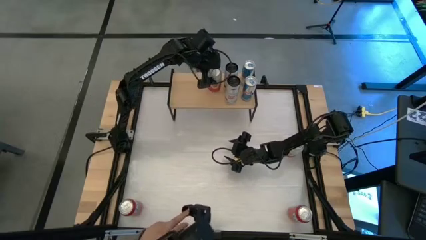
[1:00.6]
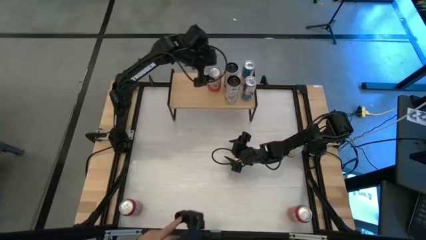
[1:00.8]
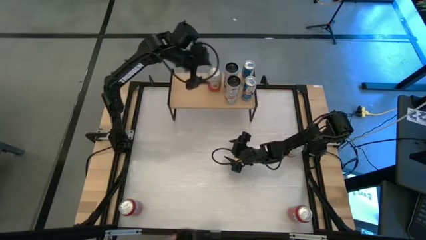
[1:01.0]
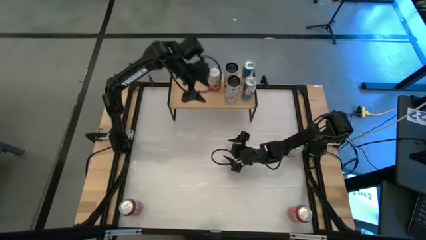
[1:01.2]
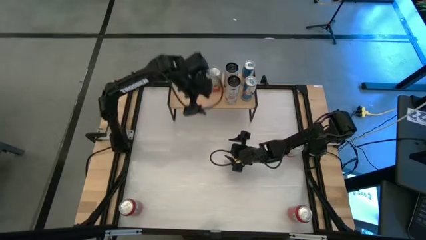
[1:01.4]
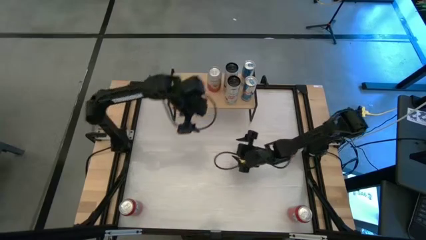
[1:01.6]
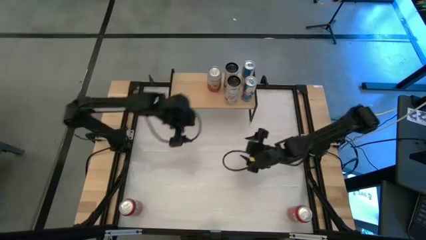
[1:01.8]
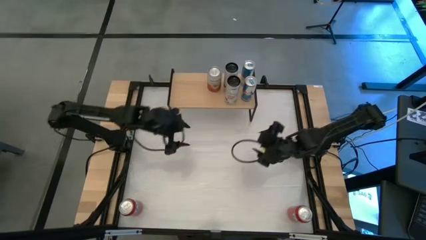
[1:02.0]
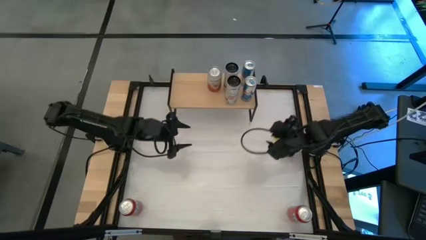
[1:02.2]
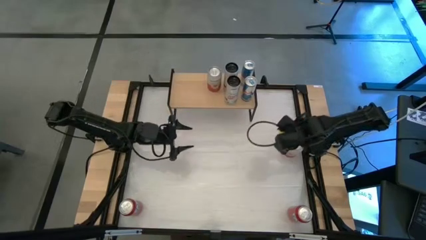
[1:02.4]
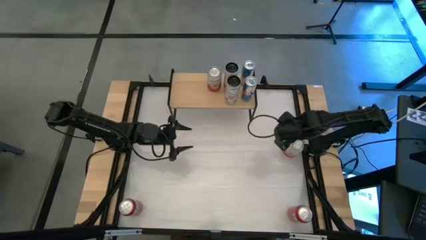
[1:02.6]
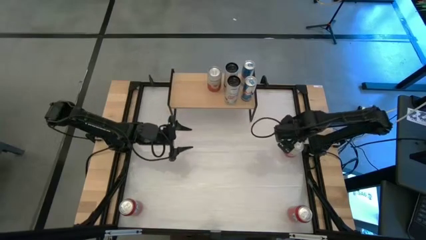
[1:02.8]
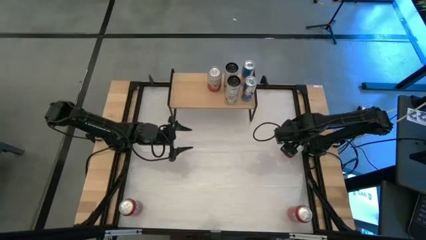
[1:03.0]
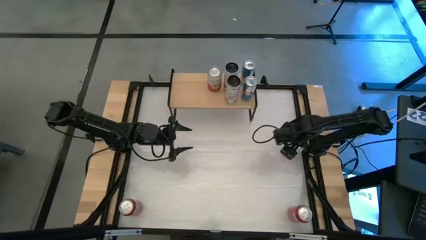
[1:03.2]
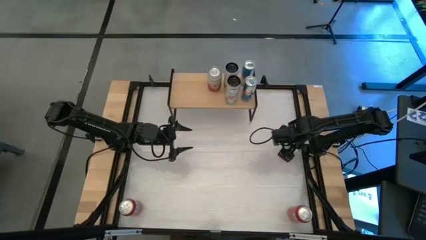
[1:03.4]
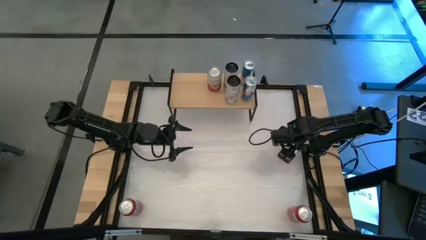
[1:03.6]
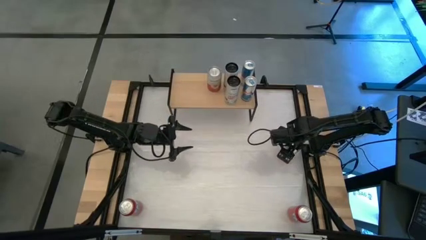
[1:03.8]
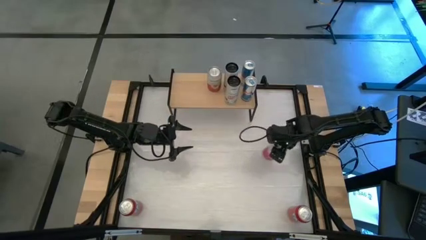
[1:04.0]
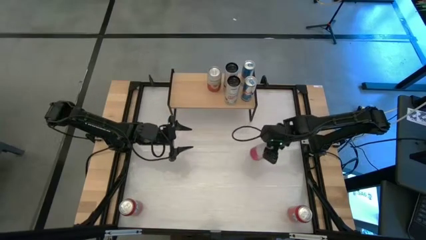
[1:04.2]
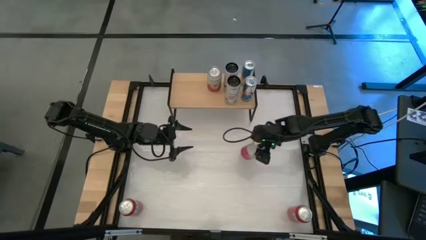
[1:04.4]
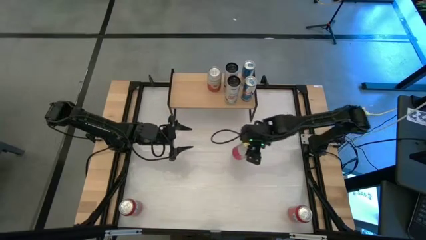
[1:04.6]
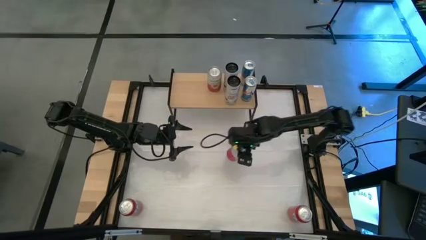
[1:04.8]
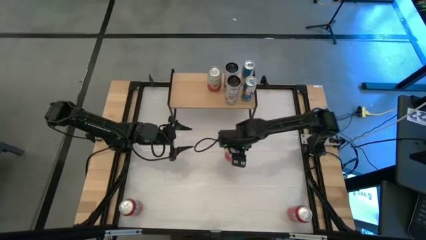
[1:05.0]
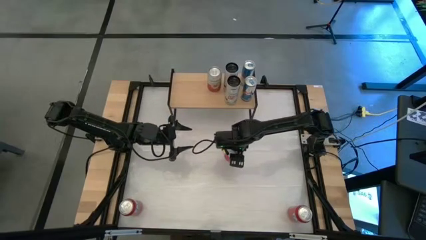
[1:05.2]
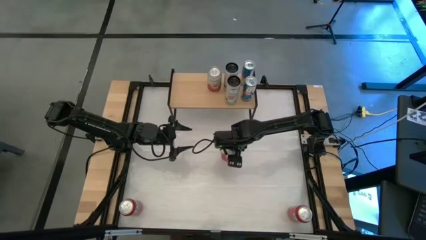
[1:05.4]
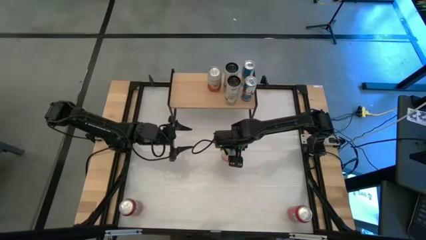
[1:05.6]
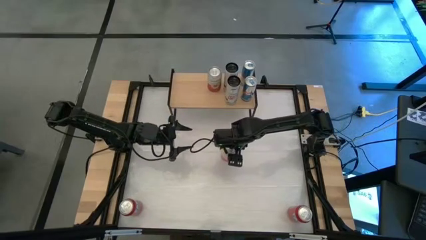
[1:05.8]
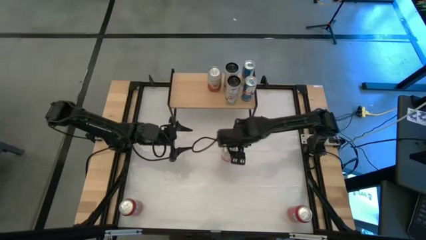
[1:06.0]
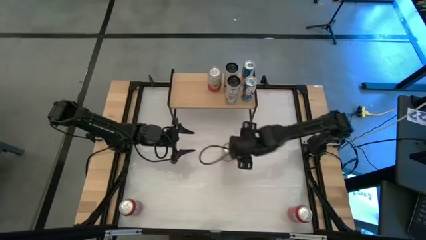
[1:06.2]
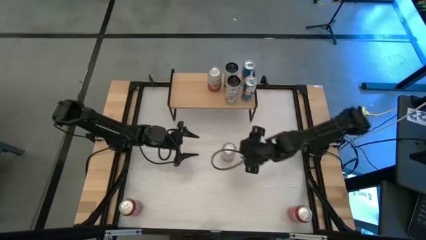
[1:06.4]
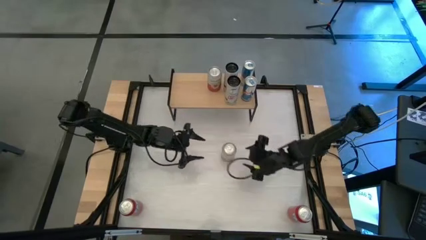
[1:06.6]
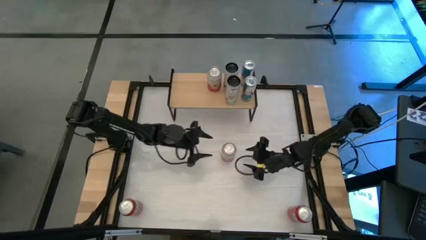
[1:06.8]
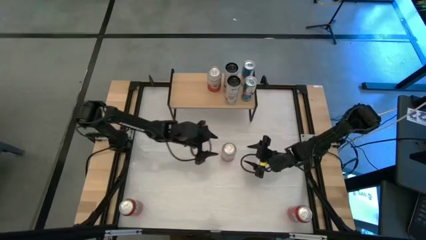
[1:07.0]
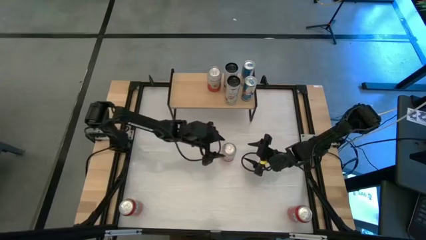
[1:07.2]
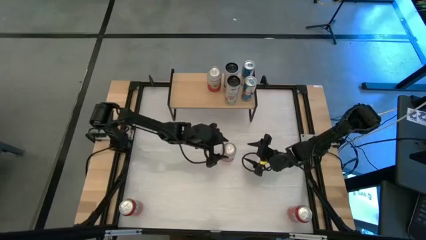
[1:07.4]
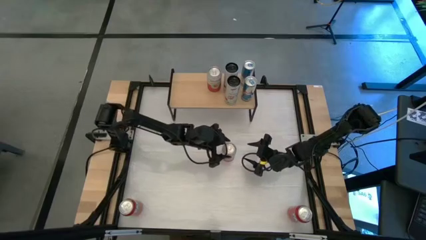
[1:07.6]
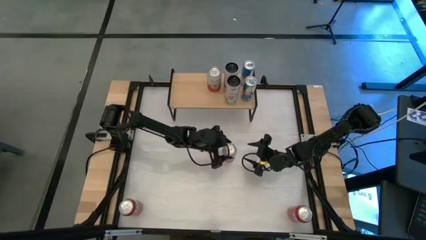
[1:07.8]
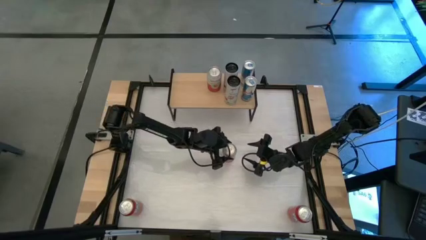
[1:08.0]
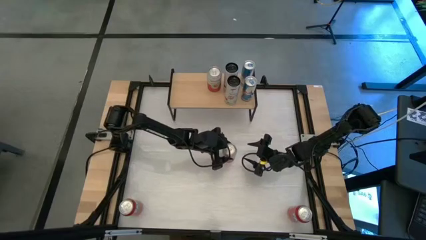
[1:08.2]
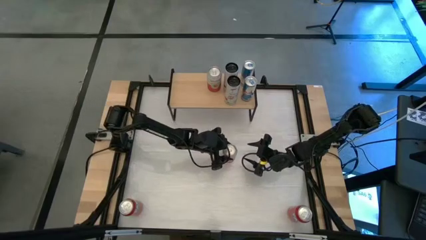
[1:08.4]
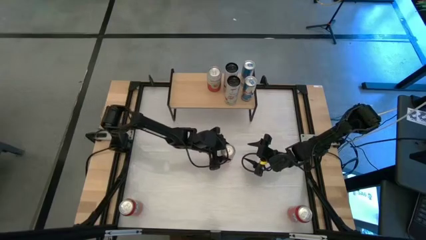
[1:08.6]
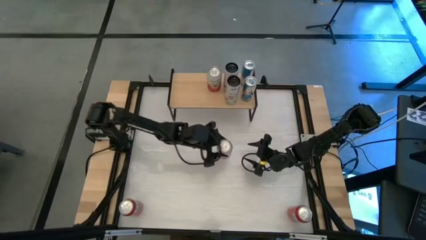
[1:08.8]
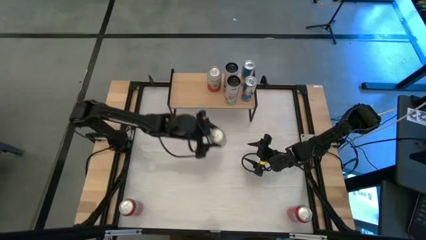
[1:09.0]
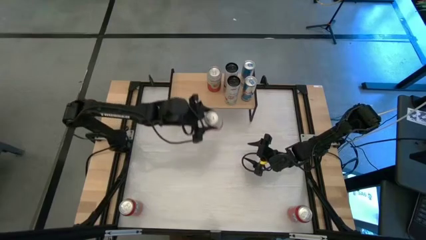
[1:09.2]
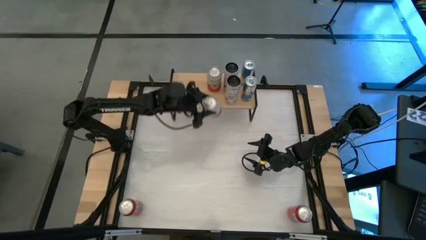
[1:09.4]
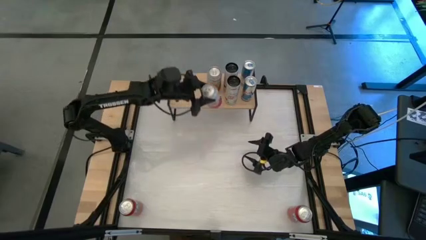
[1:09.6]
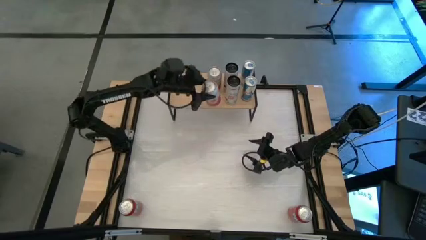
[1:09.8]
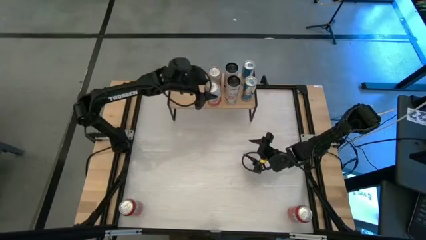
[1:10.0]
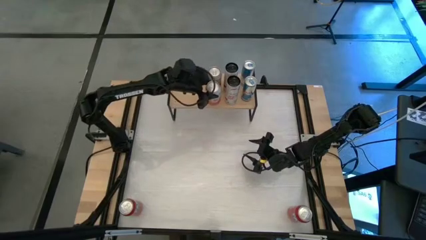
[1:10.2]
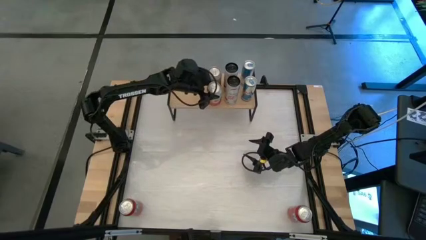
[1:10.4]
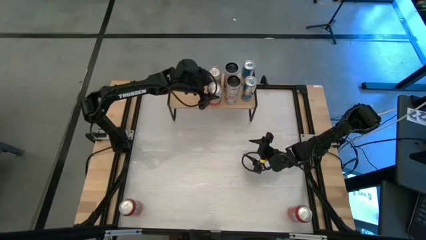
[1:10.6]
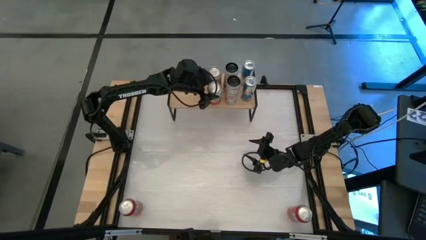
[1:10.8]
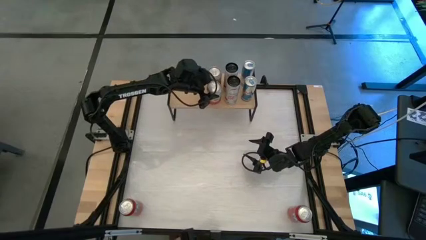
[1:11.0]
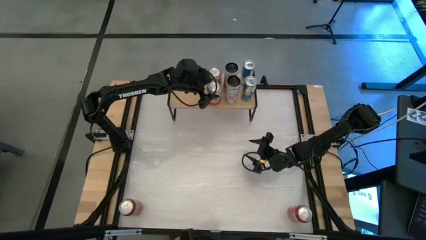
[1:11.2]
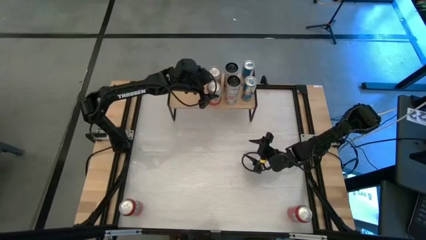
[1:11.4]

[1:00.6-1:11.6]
Task: Place canned beverage on shelf
Put the pink white soda can on the shelf aligned with the other pink white soda can
